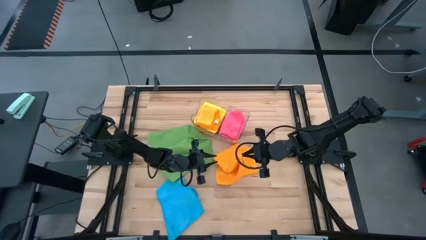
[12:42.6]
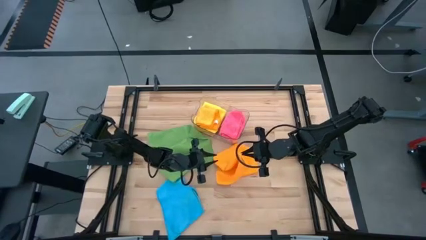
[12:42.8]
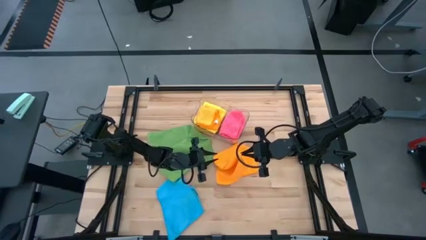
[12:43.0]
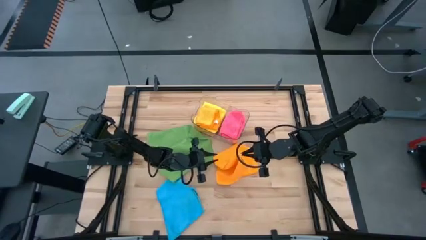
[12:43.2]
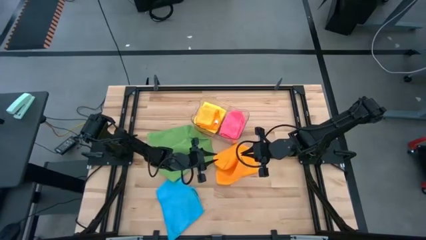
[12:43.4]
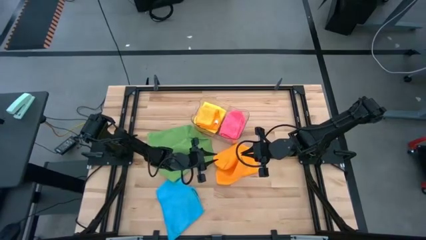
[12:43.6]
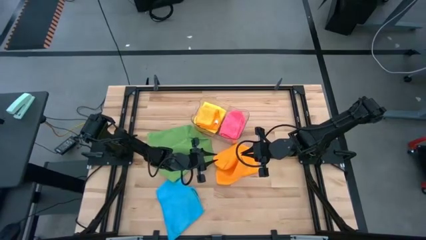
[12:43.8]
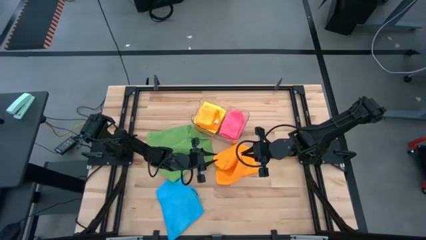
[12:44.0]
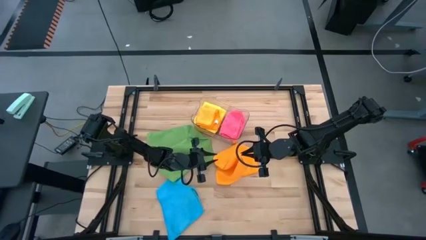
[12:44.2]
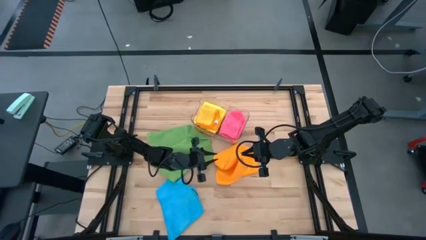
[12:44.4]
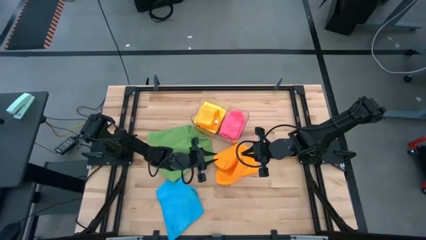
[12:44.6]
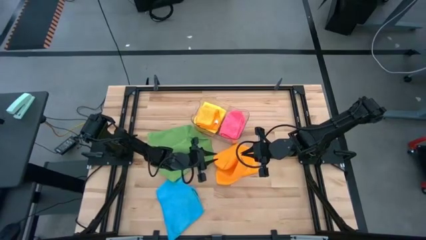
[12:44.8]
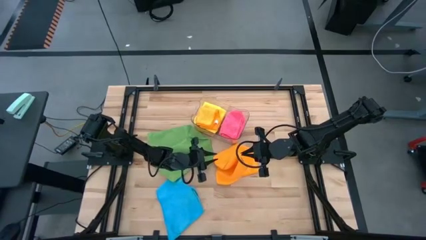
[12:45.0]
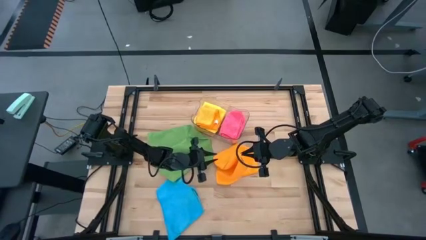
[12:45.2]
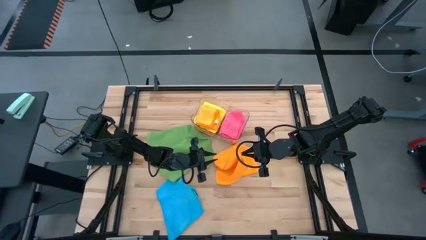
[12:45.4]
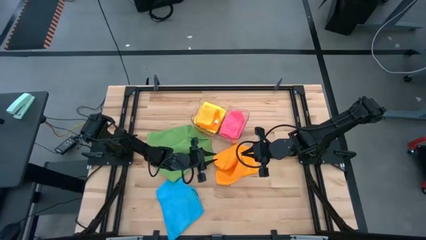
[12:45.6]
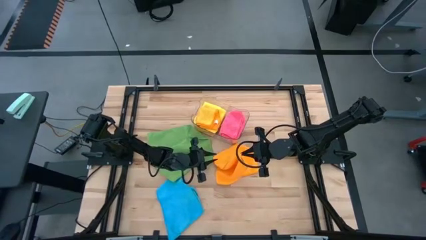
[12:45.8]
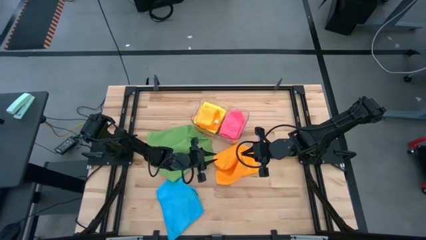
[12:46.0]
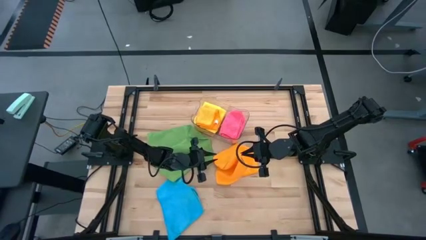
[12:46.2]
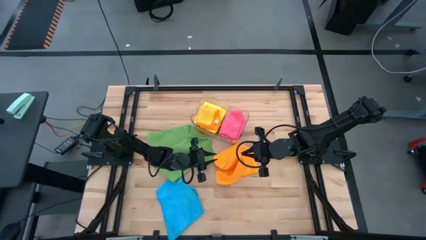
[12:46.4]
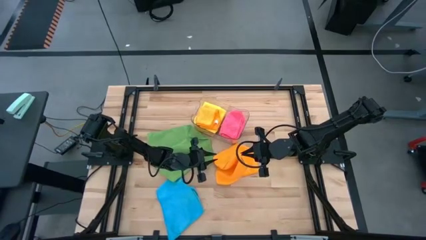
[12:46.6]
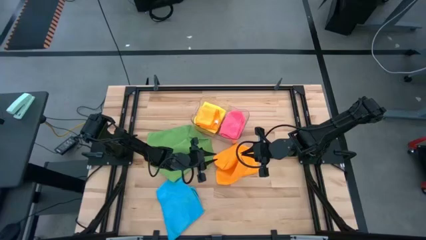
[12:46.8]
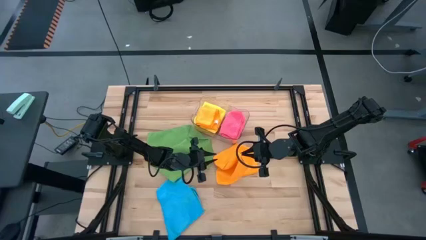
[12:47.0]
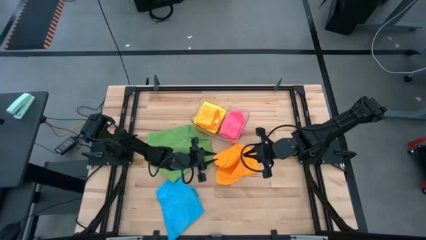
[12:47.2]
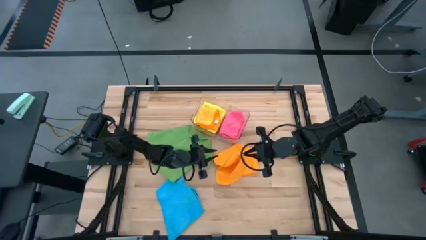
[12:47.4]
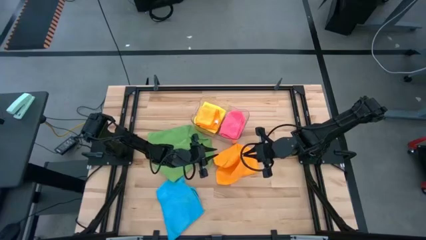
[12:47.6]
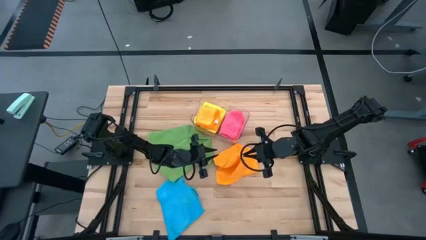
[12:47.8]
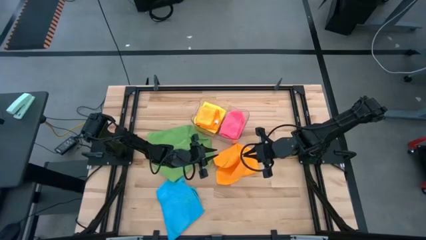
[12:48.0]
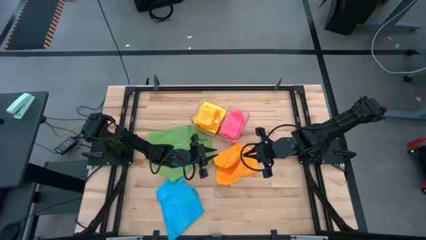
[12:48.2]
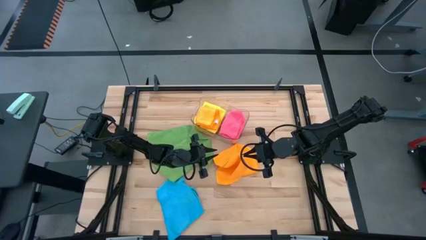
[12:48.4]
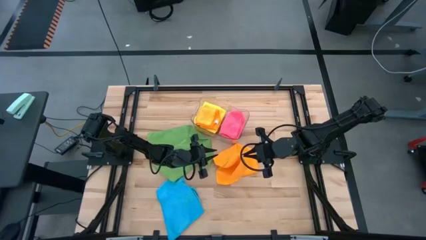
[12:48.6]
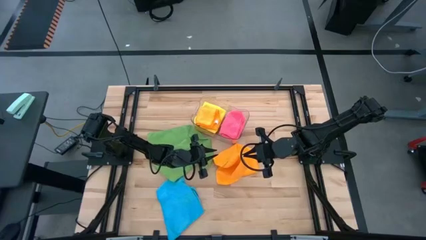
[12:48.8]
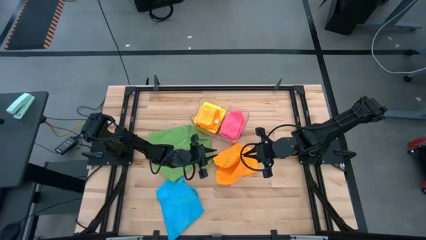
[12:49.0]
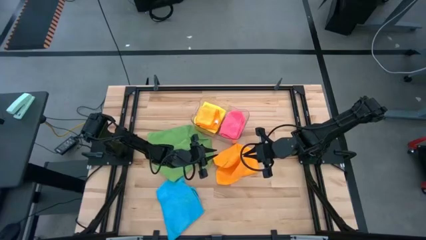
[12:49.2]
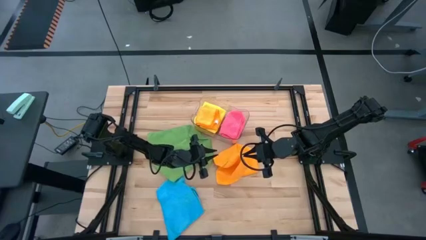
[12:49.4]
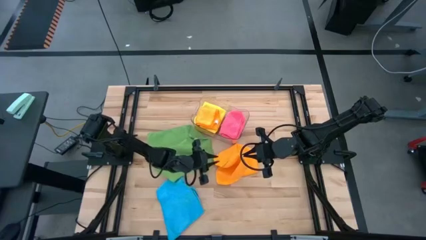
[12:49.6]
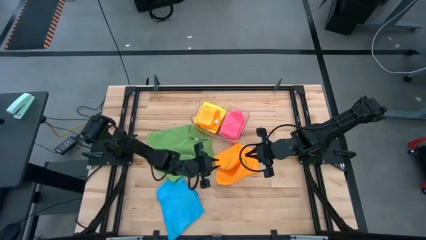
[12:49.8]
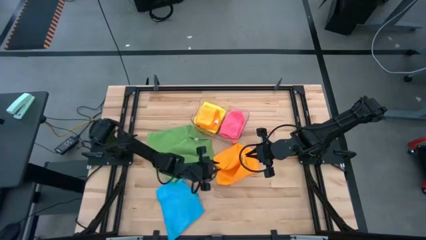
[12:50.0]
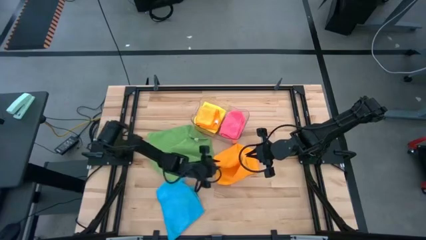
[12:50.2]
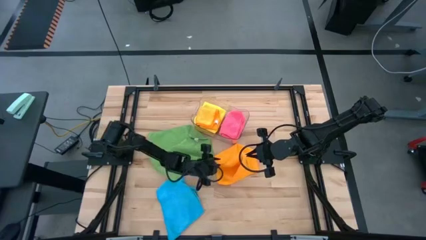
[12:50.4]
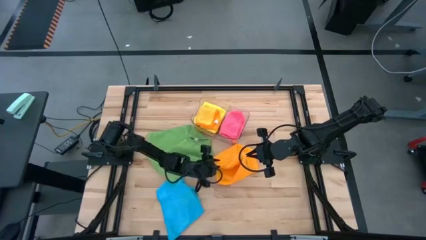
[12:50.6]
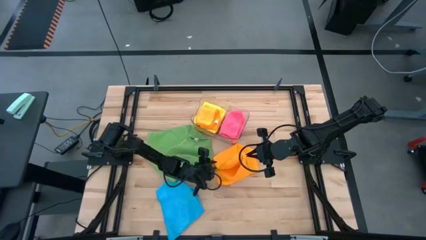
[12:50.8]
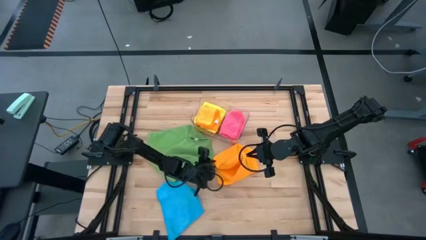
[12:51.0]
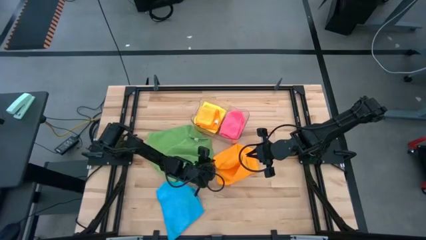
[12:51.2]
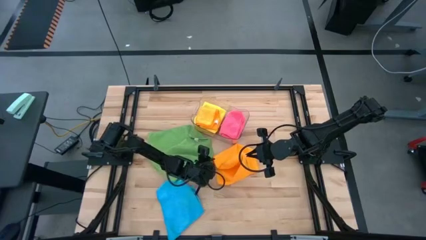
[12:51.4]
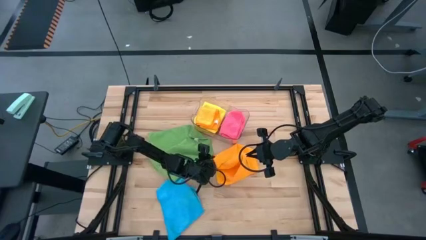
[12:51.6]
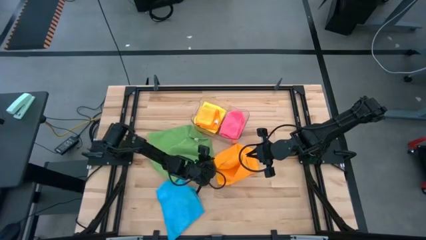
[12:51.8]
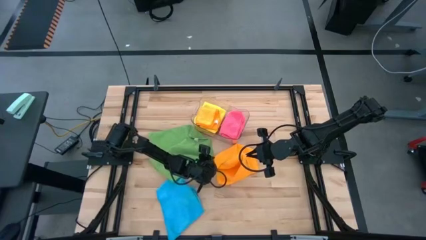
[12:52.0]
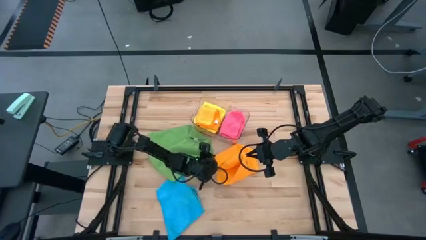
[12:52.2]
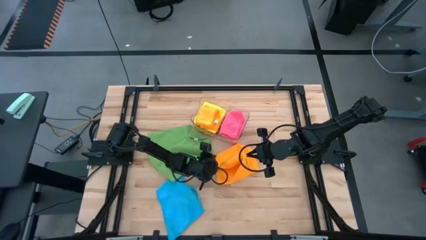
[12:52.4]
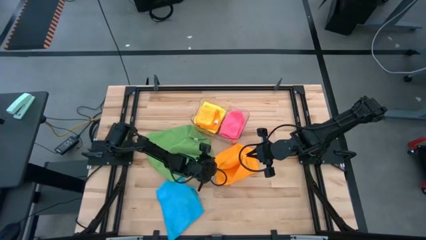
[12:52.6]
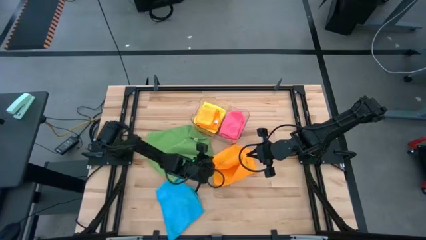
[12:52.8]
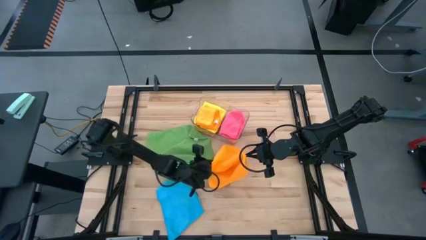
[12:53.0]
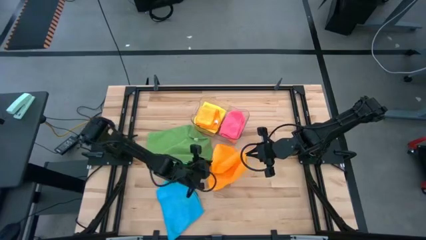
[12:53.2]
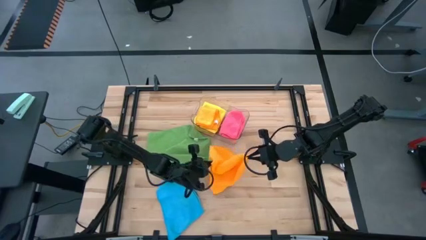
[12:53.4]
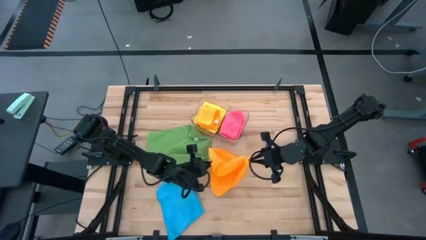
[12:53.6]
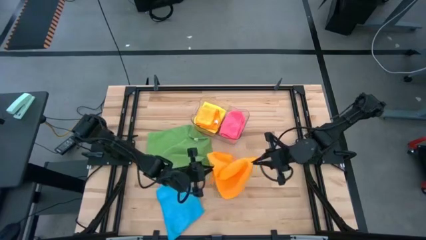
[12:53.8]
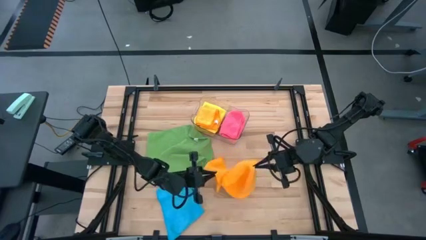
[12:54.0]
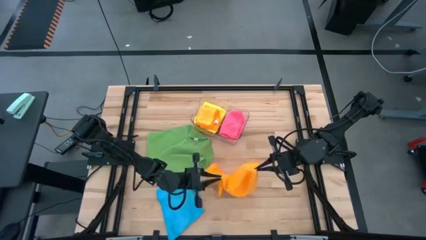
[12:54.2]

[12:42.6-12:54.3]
Task: Fold microfiber towels
Fold the orange microfiber cloth

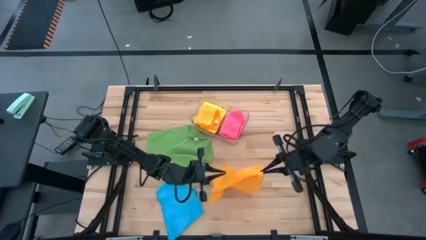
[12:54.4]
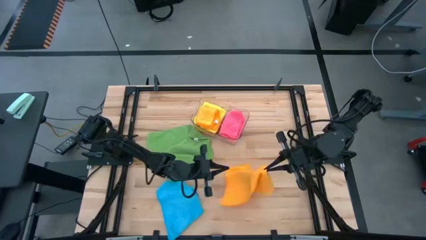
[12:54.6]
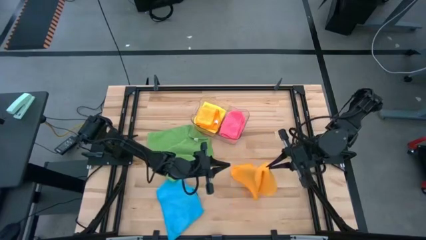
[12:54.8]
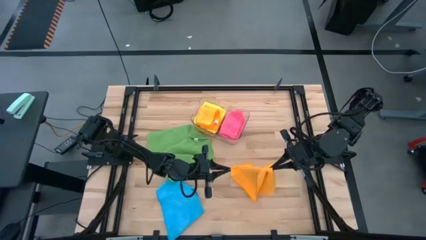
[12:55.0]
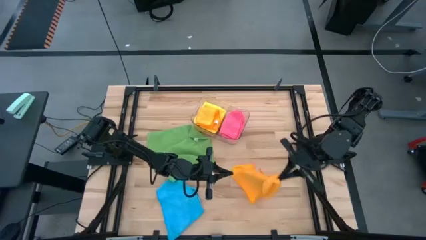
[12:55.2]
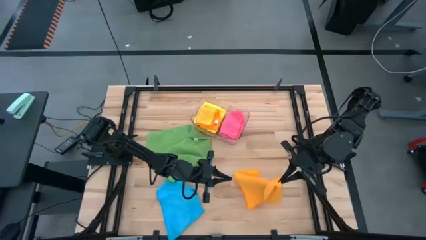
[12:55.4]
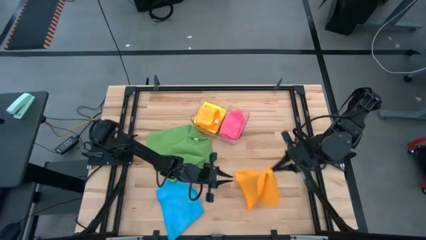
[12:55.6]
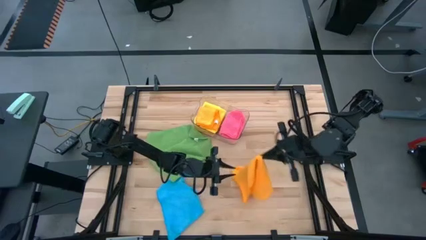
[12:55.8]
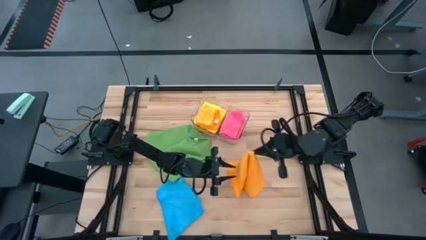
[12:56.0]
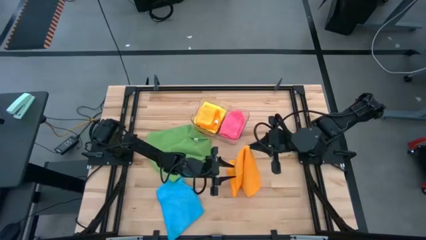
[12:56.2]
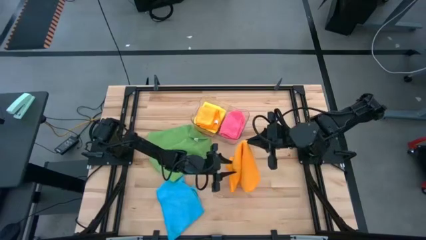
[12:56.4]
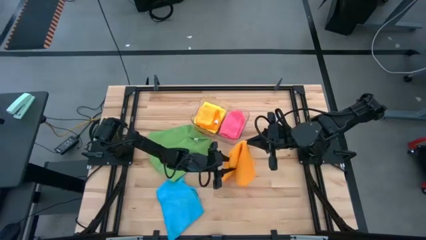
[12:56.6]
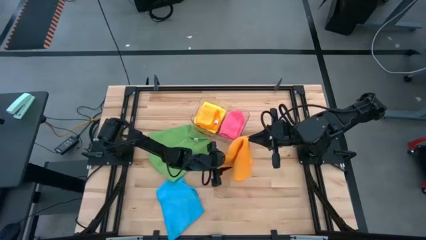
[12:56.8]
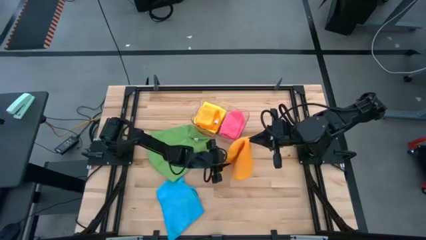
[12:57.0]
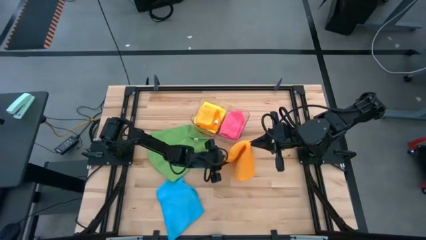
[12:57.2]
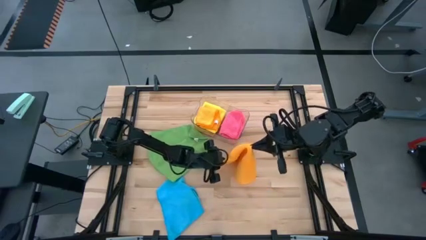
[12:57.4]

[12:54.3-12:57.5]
Fold the orange microfiber cloth
